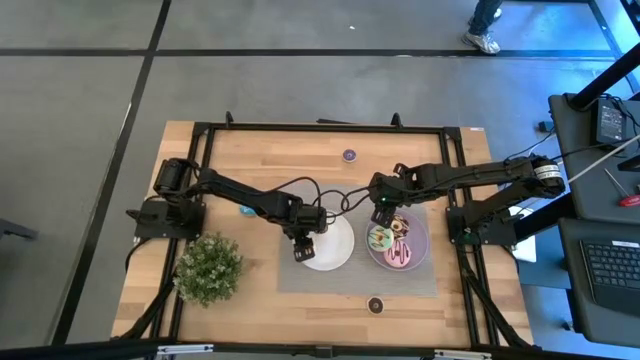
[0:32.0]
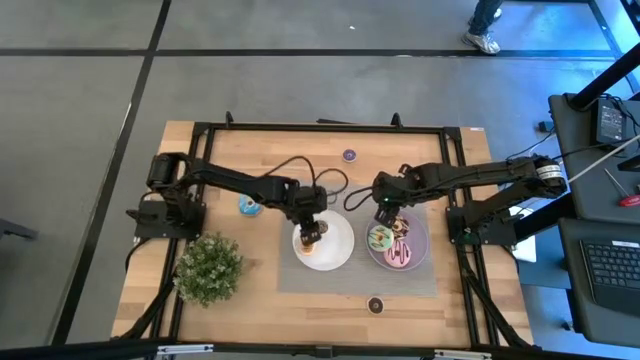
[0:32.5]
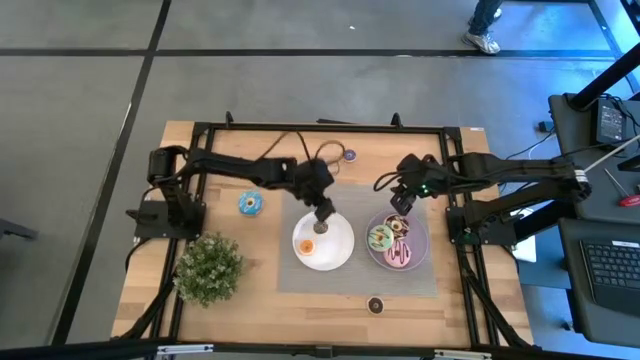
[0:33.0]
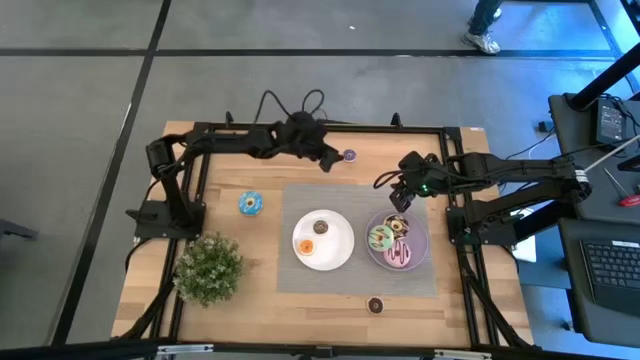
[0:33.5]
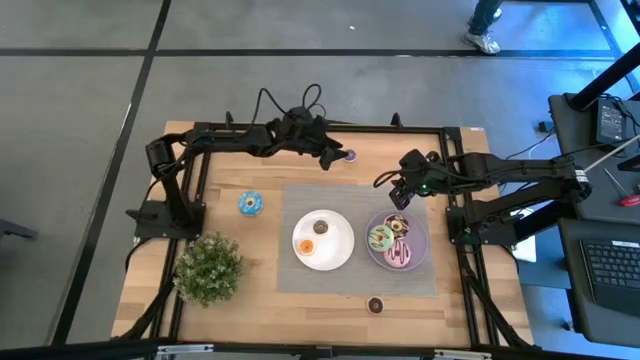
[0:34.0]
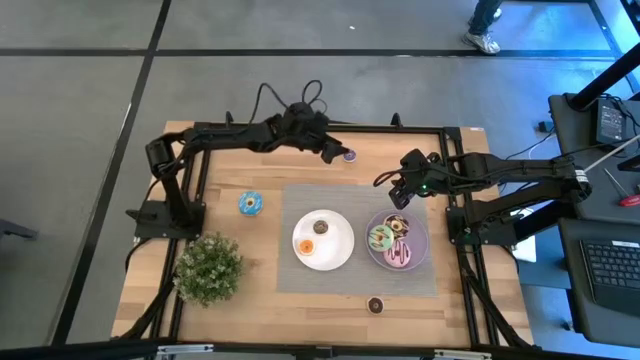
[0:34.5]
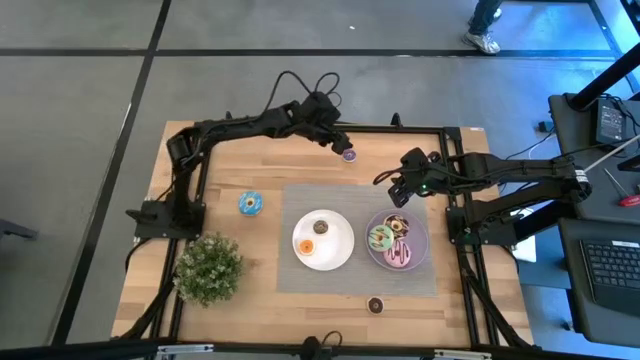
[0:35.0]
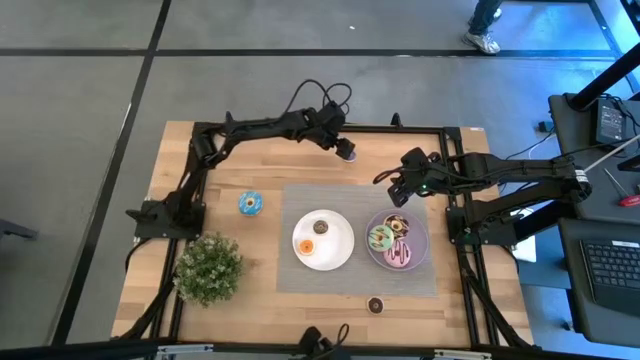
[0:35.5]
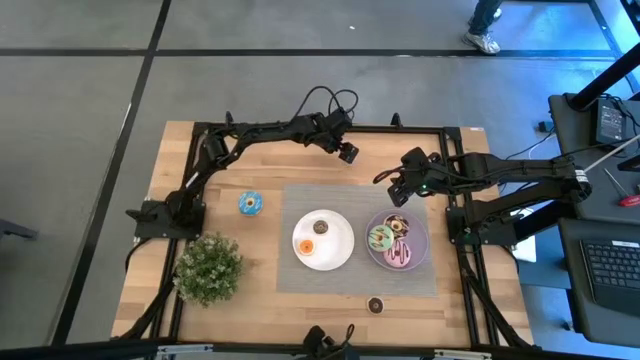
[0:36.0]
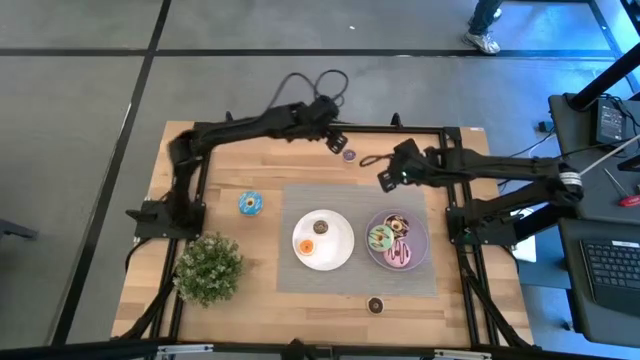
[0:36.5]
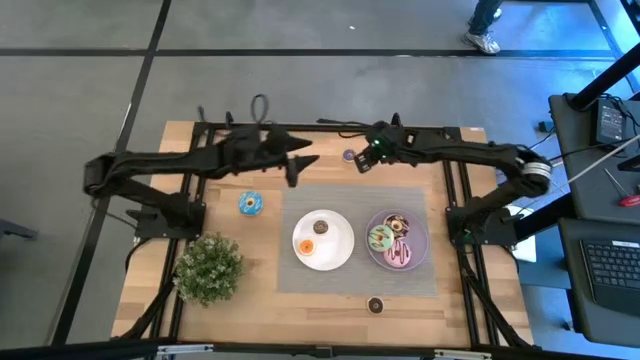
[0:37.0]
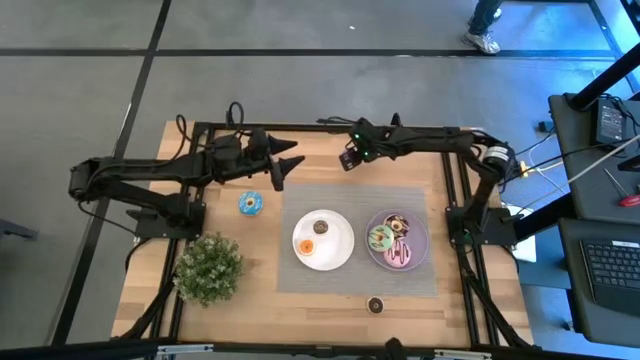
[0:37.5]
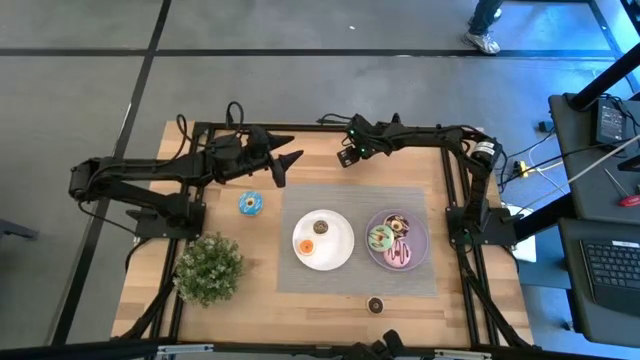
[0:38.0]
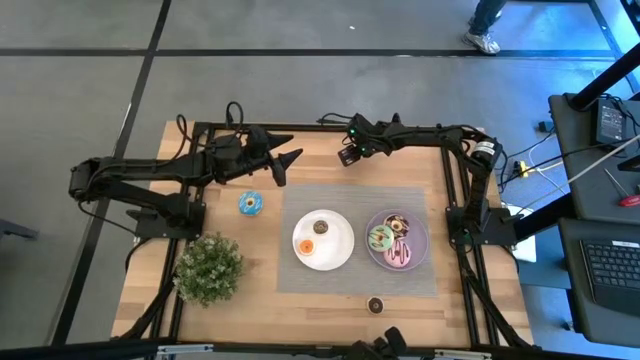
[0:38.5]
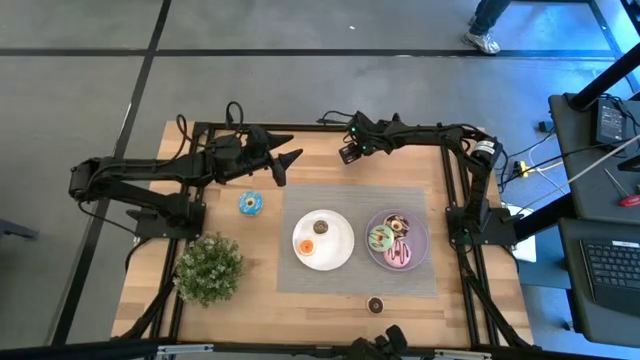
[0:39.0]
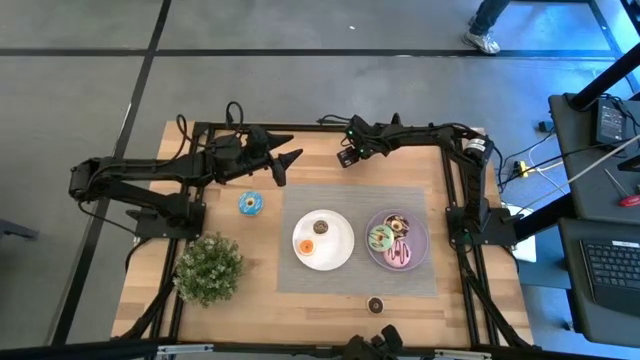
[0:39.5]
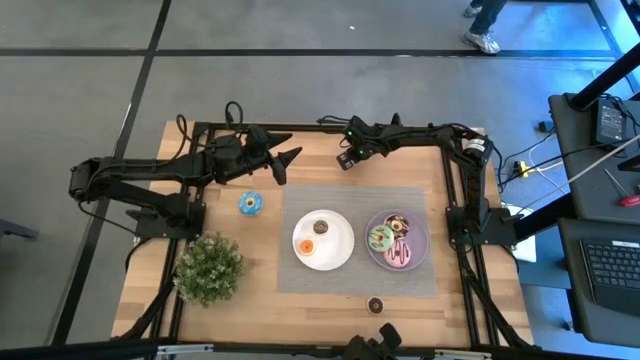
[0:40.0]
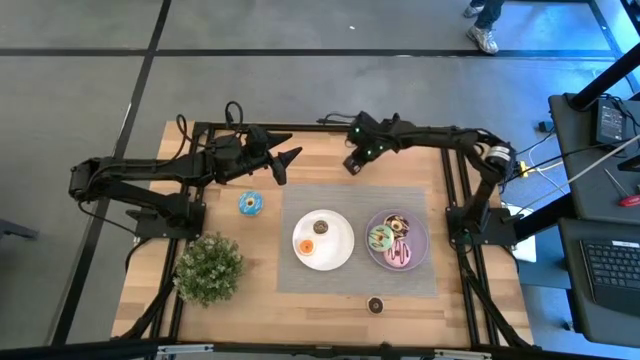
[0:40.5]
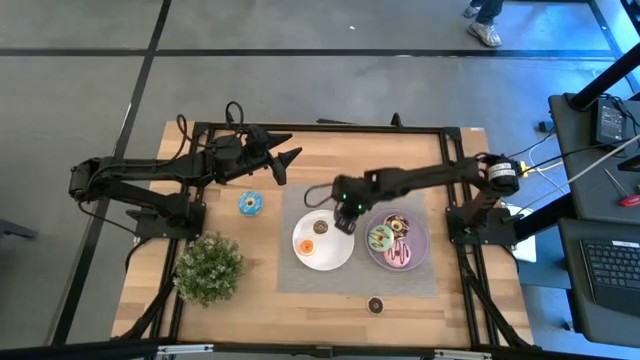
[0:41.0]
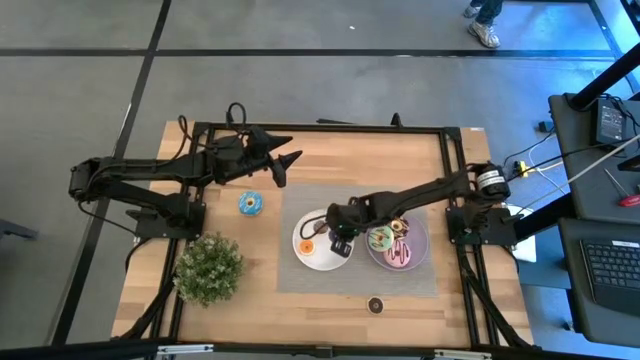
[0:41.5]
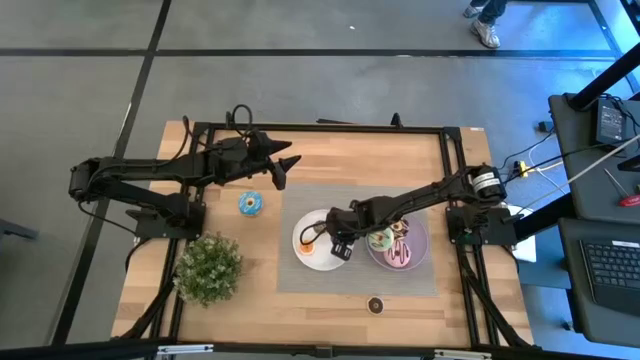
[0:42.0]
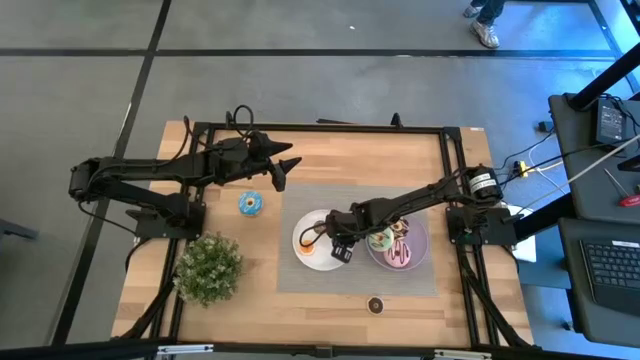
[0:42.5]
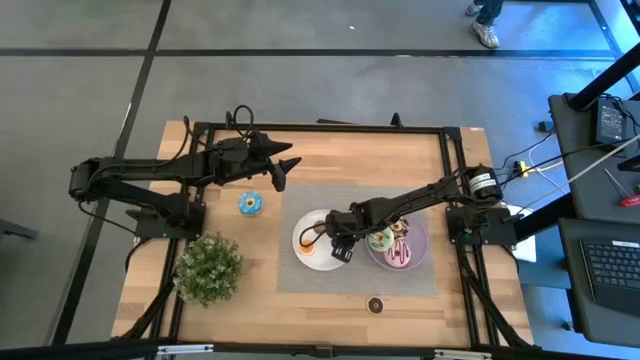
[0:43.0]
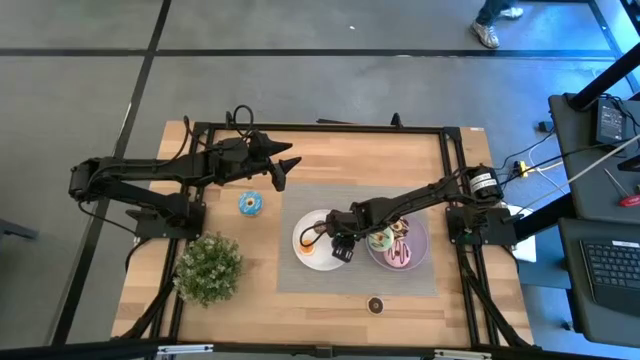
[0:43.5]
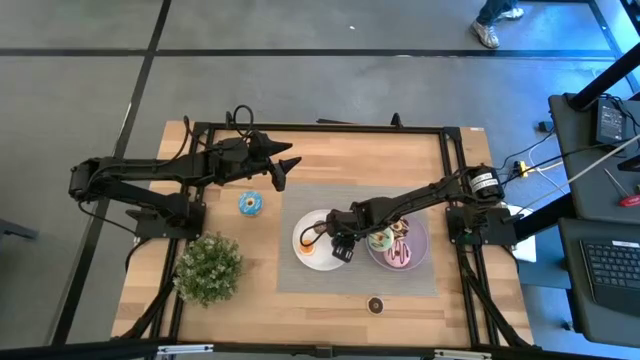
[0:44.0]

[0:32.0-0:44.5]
Task: Pick & Place donuts
Put the small blue donut on the white plate

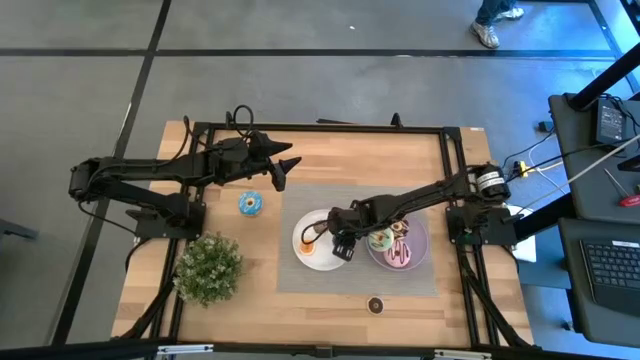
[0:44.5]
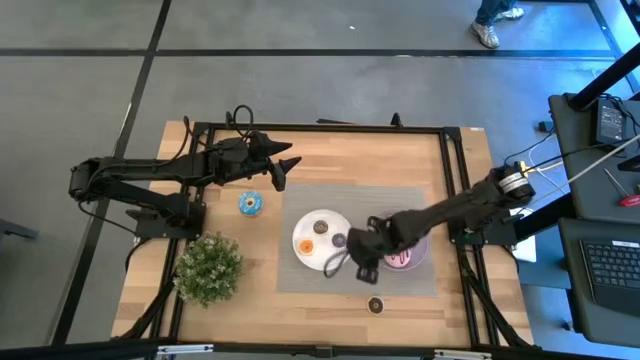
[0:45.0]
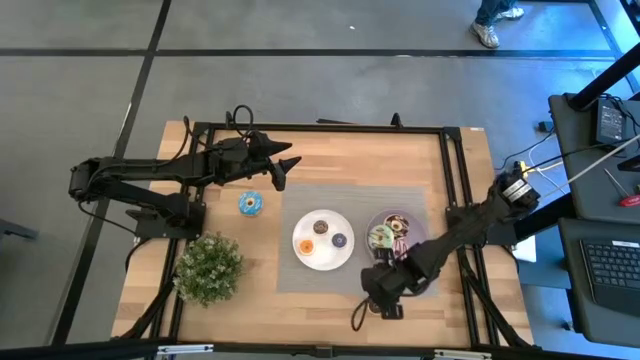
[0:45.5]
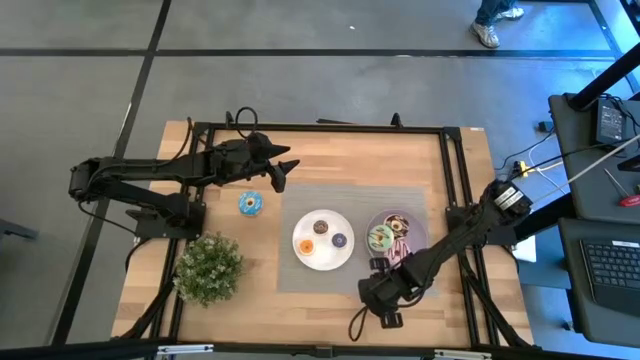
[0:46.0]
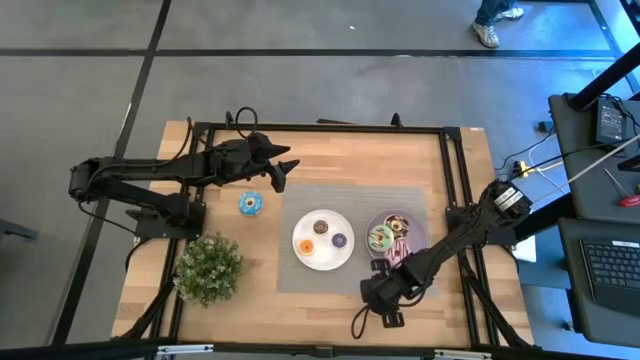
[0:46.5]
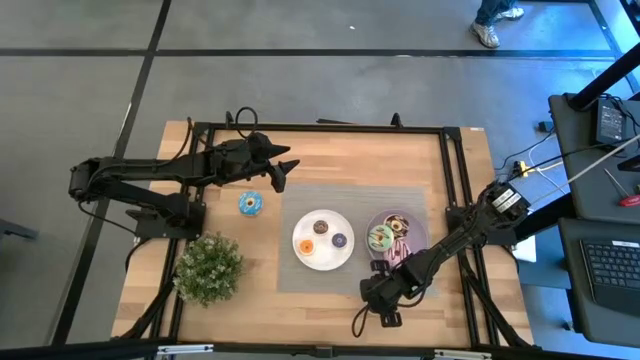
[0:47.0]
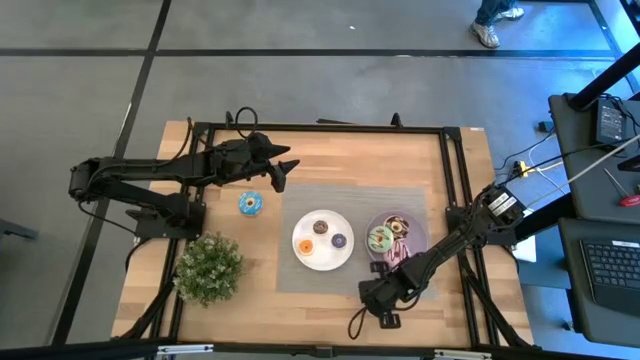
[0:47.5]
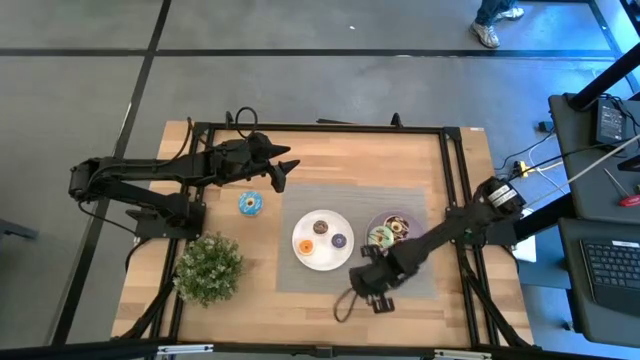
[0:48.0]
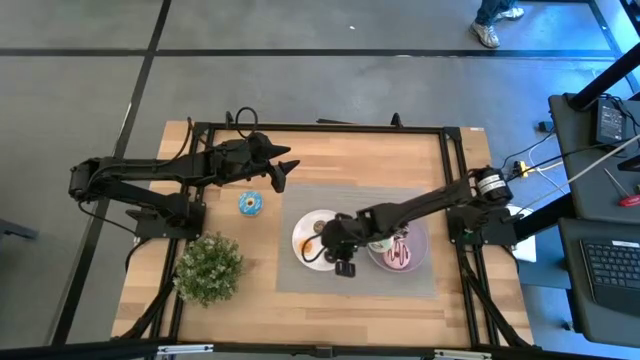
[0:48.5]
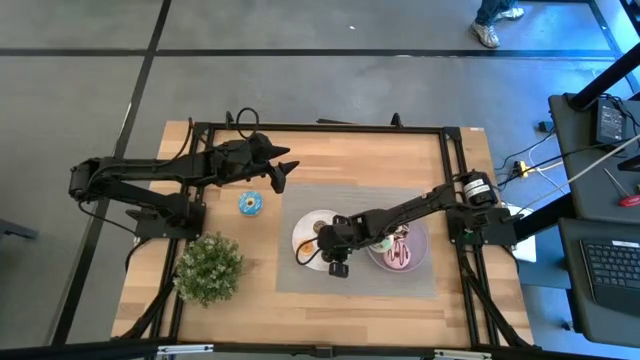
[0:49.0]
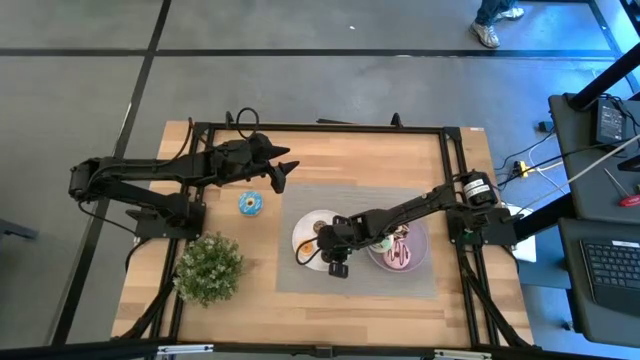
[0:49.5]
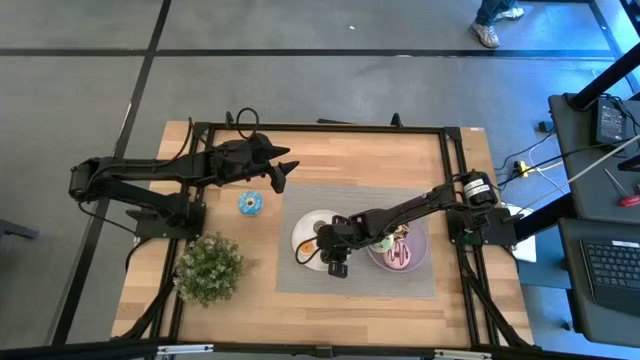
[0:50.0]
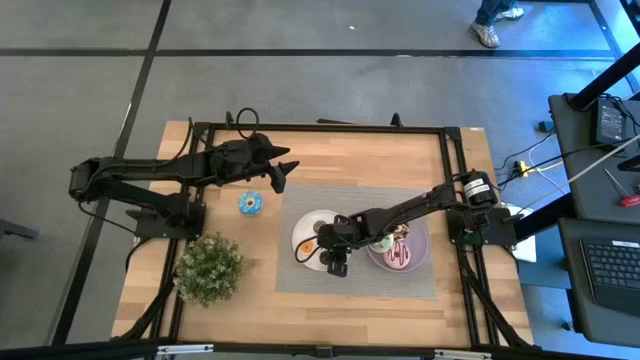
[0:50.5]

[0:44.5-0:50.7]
Put the small black donut on the white plate
